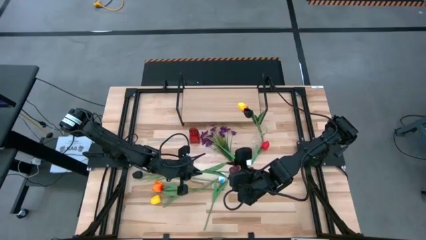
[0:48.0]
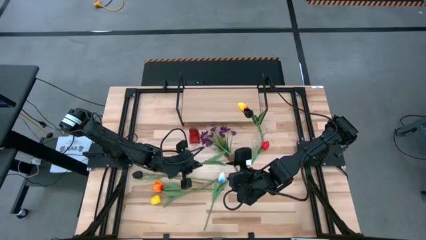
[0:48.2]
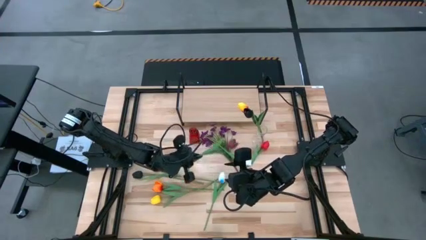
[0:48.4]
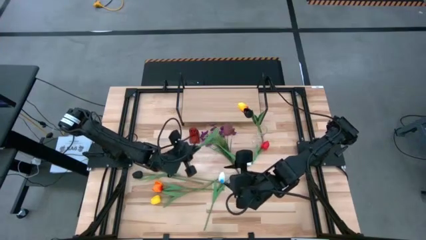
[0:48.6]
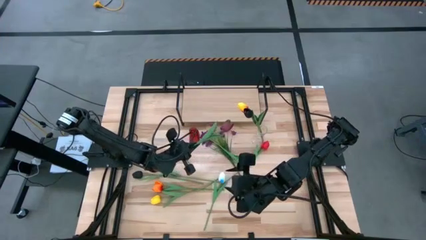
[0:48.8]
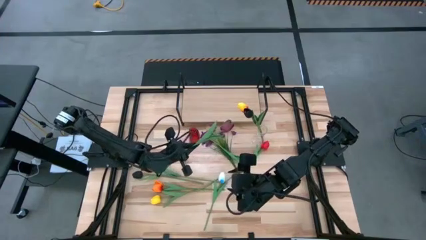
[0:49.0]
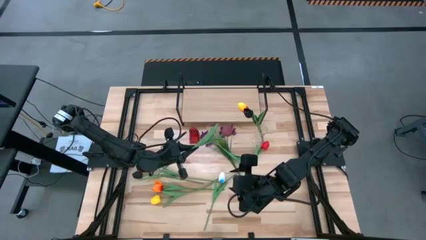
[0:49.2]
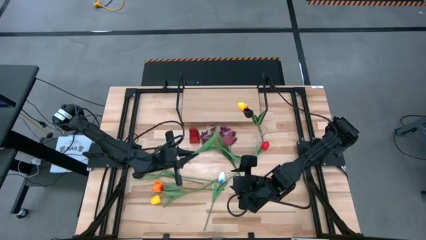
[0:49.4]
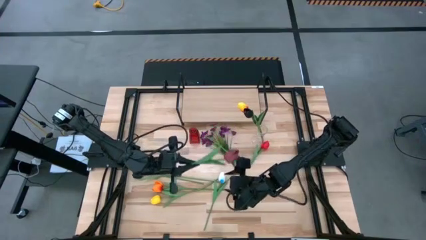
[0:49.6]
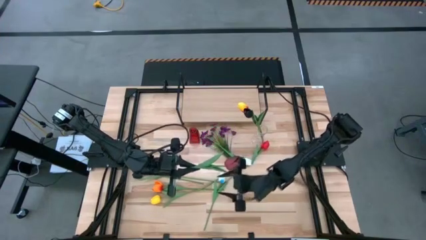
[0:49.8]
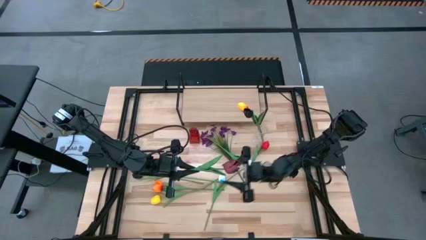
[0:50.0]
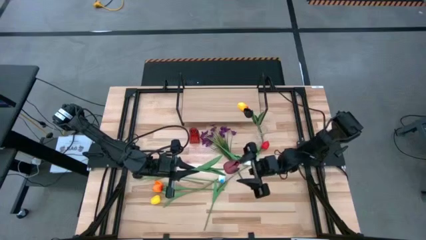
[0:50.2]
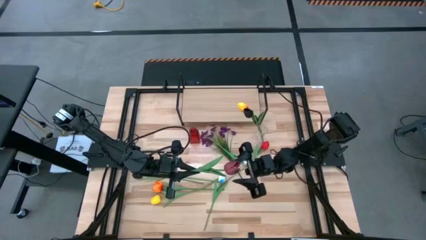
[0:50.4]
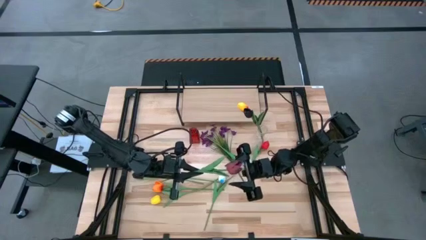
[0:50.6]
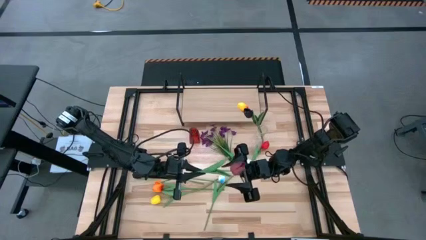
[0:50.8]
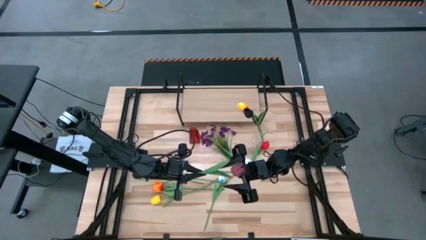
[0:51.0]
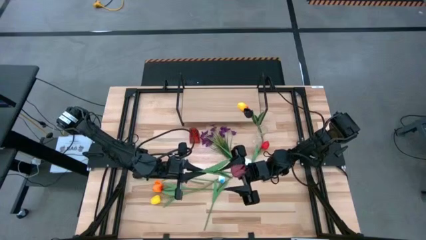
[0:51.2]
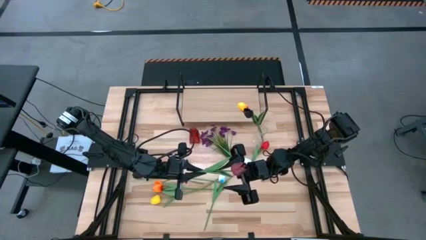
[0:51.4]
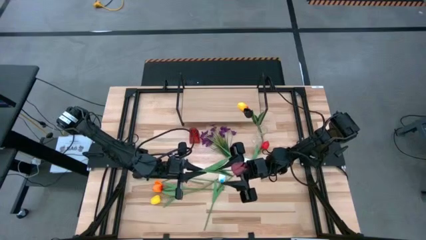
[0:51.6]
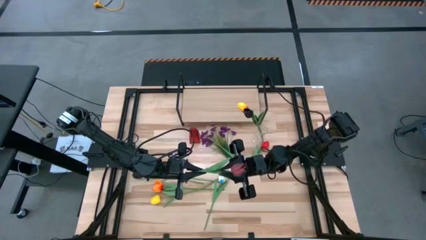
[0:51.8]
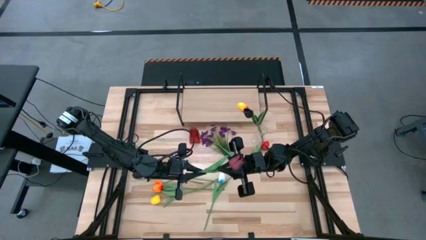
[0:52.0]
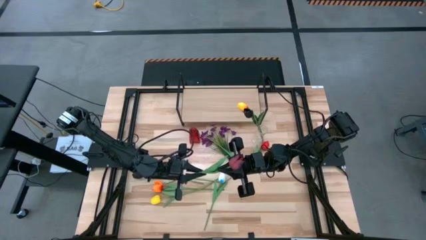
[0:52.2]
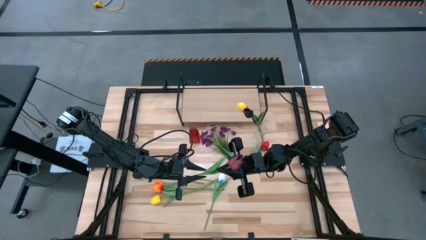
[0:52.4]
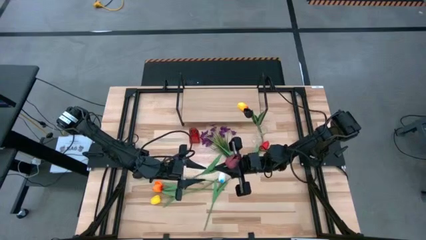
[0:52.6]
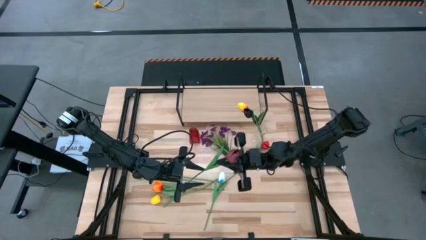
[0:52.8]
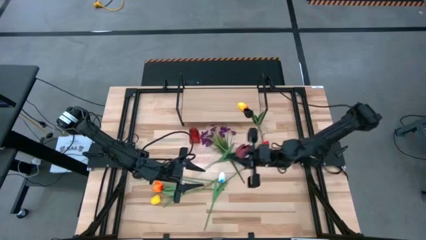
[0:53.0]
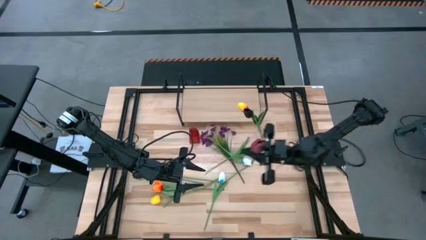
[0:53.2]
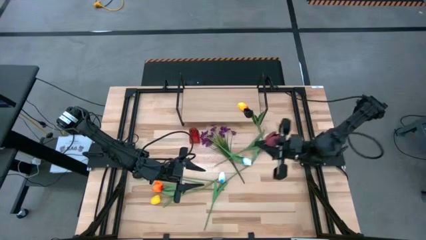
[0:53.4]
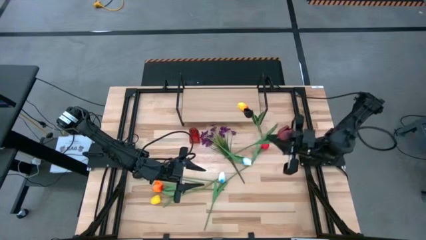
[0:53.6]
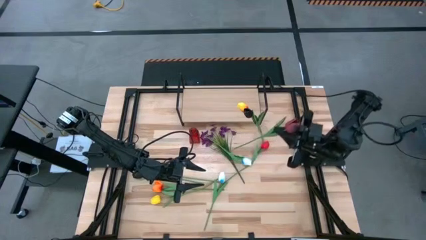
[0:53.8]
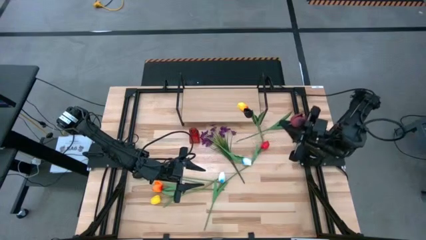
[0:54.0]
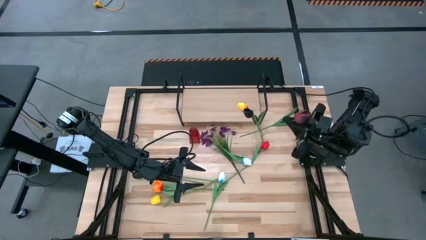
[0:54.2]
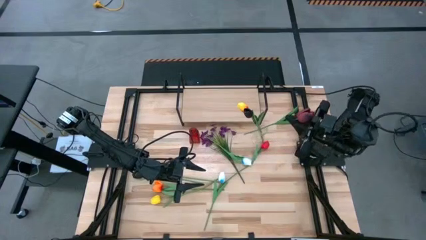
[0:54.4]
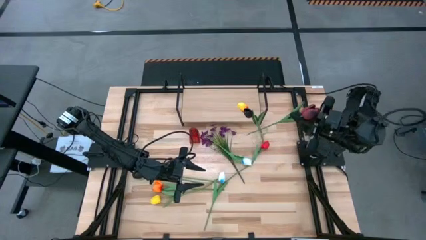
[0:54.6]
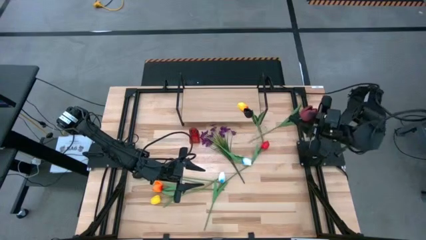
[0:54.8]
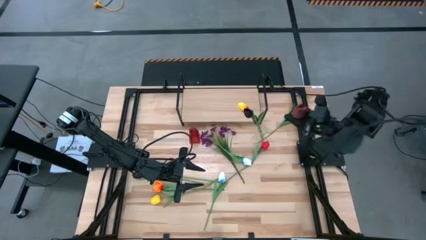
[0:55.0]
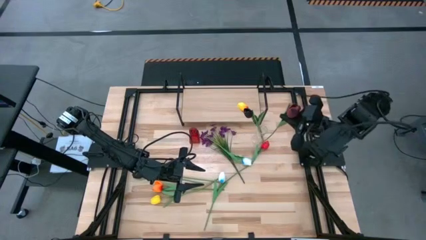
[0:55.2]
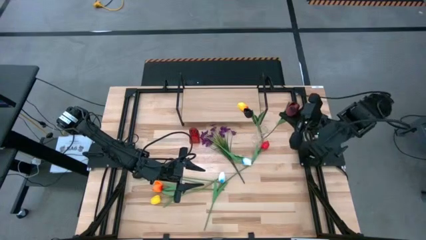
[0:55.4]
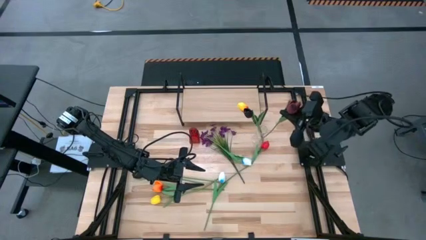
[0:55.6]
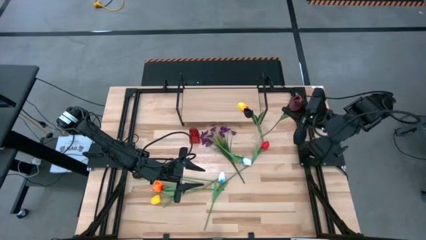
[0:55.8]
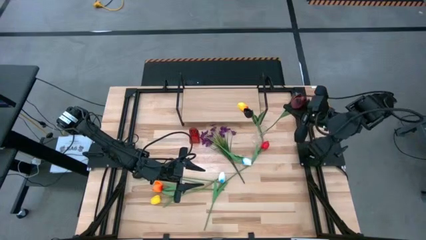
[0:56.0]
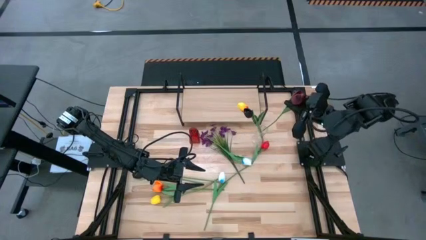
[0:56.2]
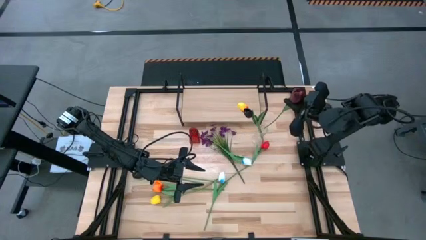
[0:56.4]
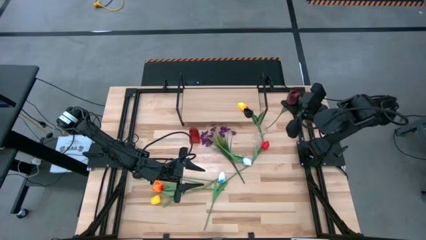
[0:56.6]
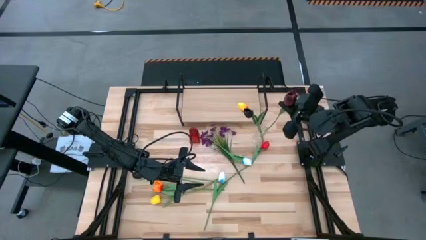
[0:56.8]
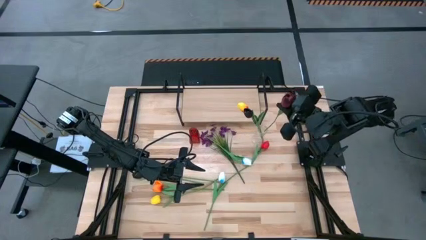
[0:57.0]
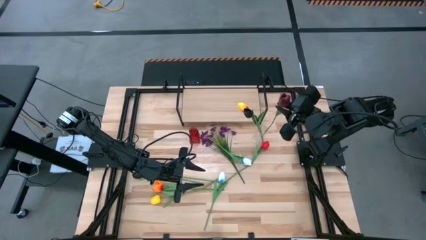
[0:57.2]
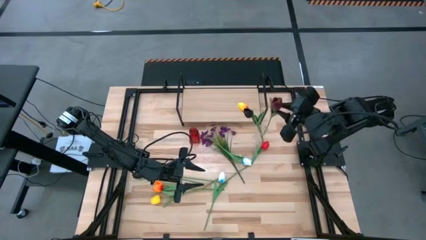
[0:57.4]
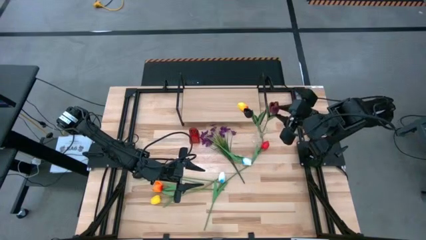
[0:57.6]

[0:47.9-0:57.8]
Task: Pick and place flowers into a vace then onto a shelf
Put the dark red flower into the transparent vase

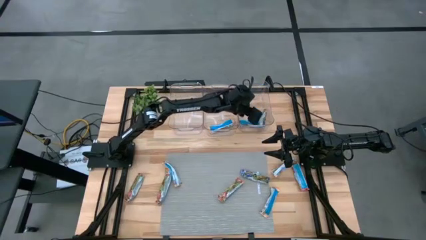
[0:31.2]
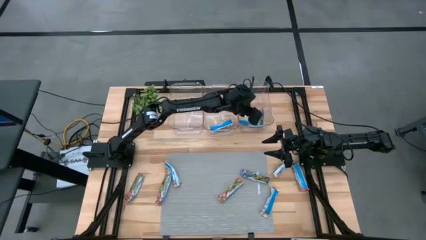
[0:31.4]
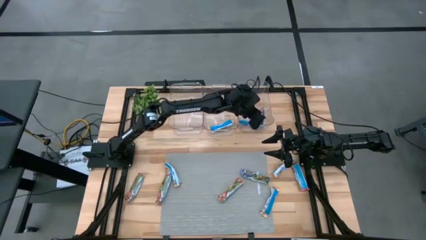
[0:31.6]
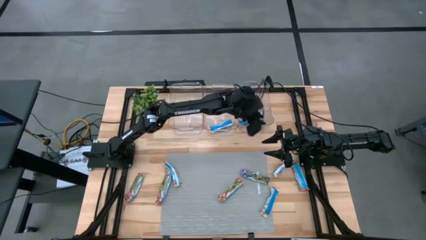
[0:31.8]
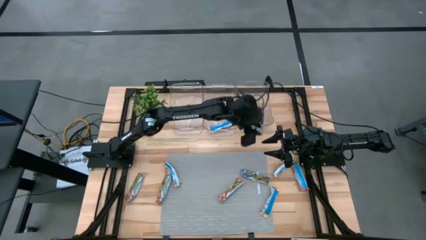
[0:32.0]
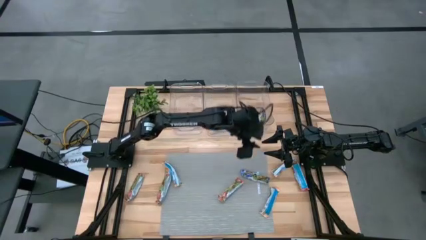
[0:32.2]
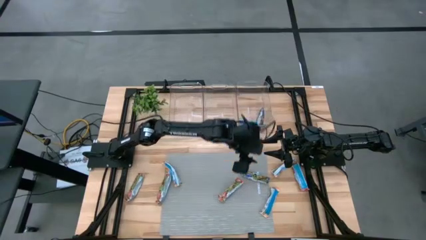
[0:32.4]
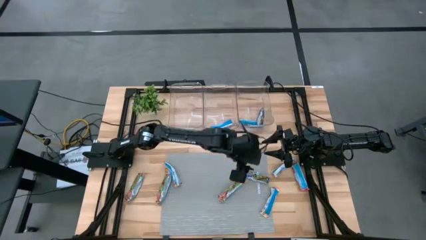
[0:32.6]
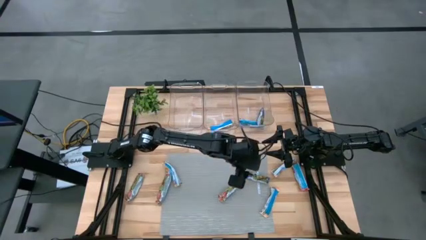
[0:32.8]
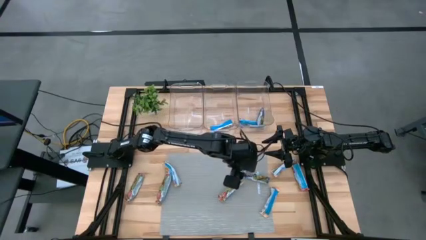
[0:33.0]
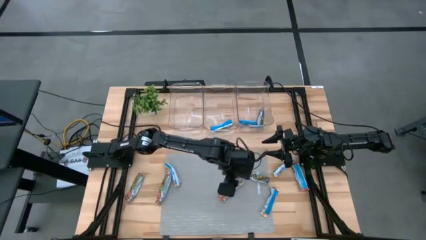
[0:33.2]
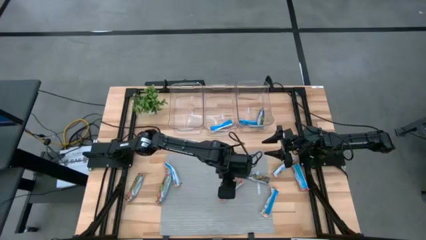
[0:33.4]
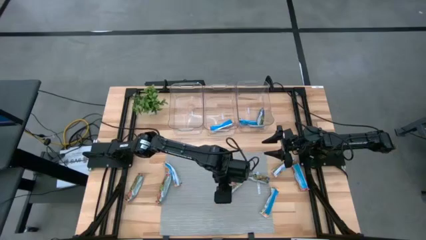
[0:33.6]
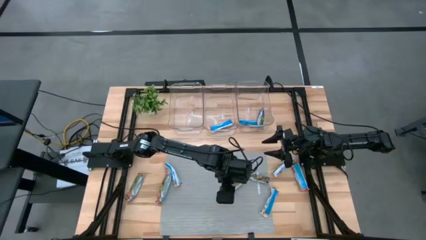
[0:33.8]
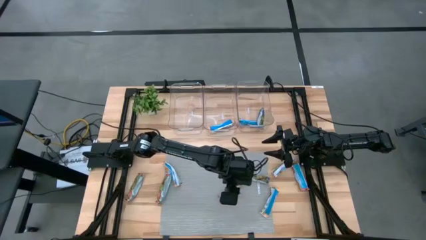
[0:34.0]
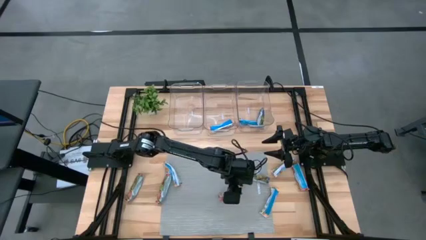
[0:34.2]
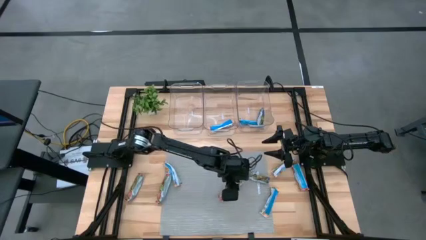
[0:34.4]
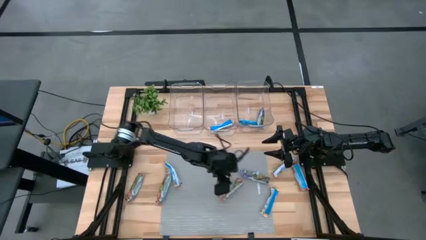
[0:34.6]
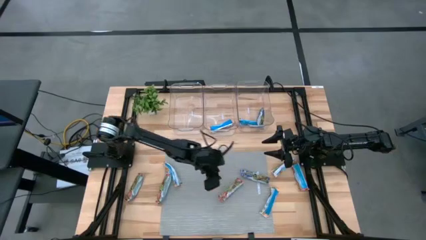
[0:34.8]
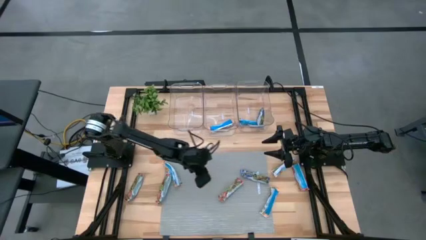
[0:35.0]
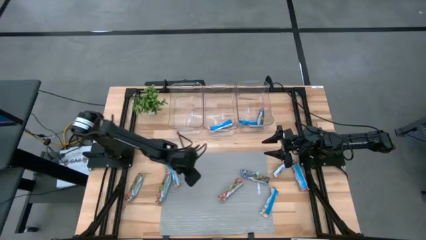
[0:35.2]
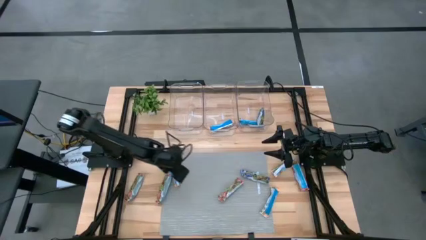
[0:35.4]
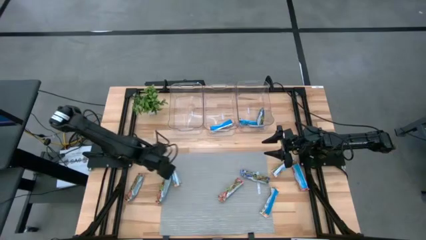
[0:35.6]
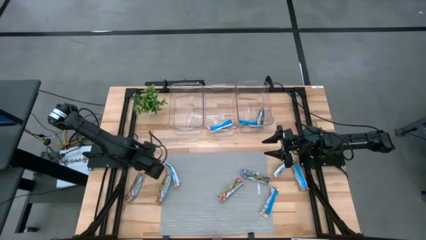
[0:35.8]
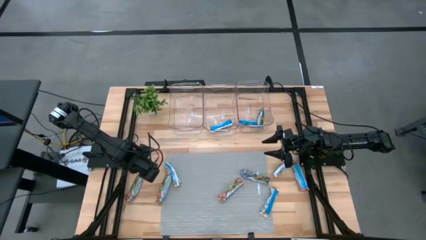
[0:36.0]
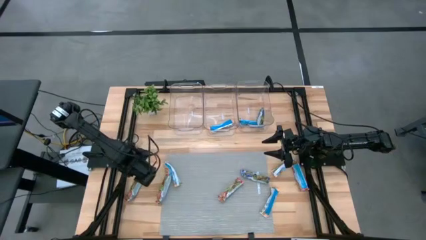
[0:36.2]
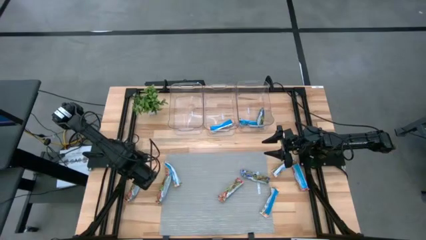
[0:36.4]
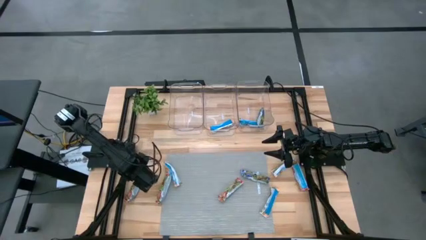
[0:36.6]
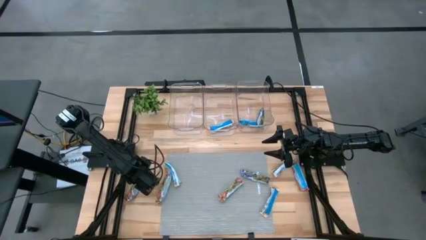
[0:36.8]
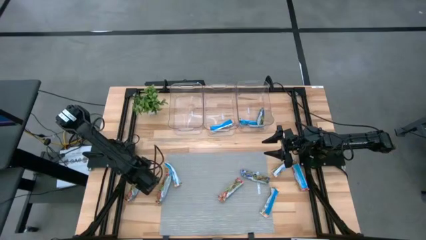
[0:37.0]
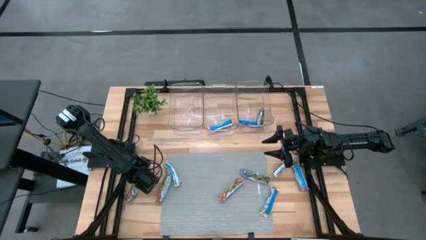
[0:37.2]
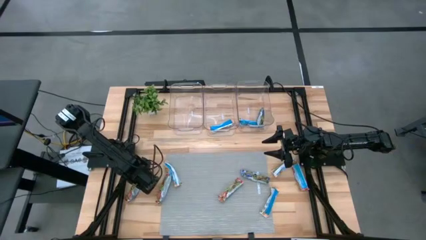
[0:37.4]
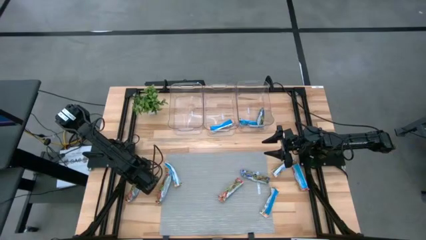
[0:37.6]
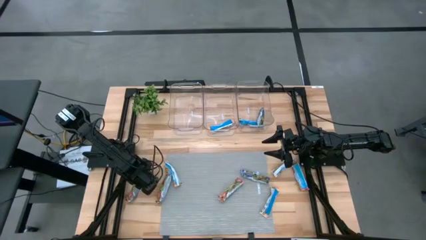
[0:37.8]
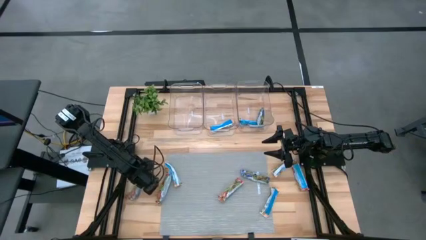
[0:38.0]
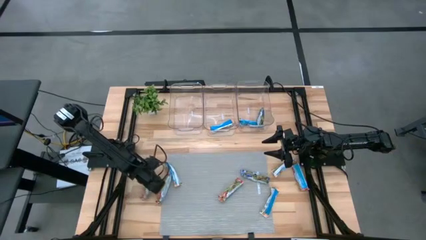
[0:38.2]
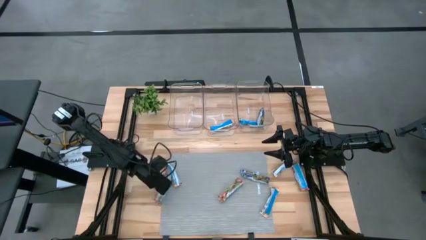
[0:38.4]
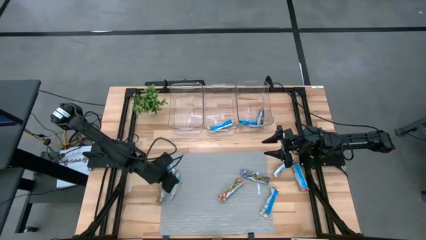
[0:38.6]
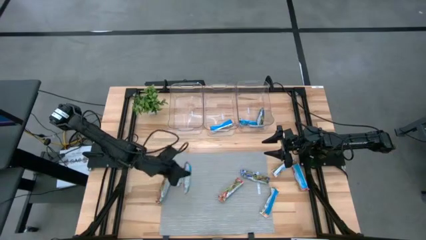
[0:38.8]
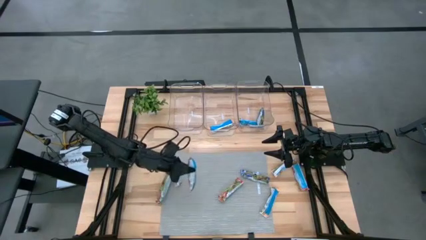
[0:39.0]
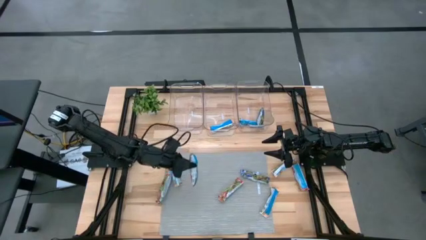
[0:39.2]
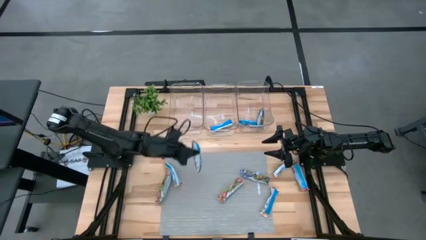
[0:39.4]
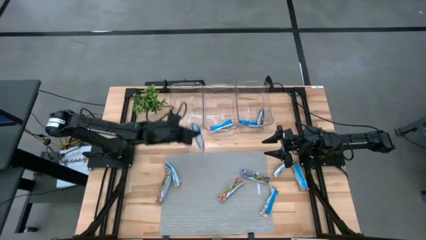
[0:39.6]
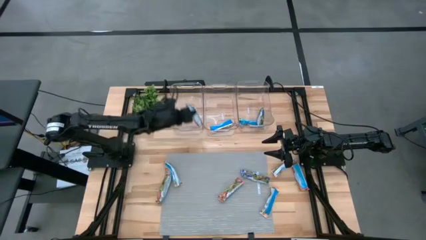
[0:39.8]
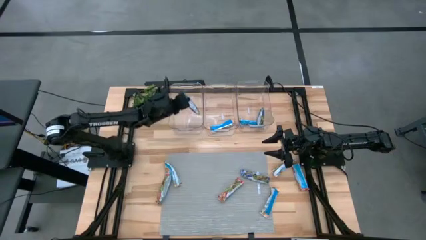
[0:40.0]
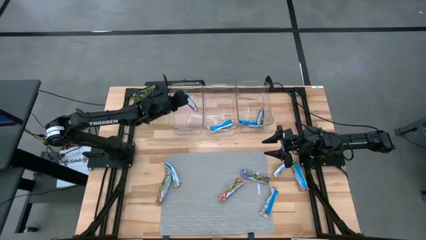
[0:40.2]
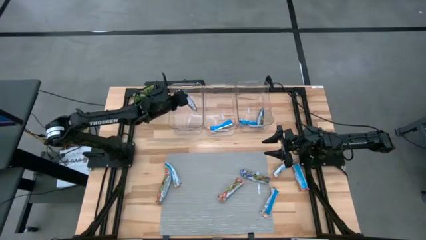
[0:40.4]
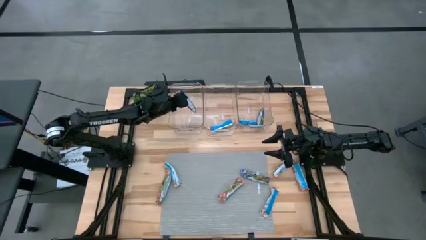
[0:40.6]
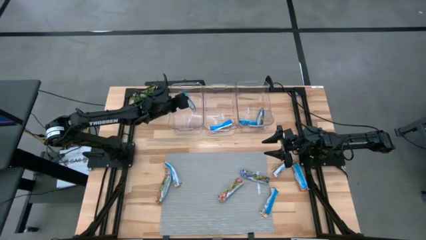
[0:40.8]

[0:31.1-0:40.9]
Task: Pick and place Granola Bars by type
Put the red granola bar into the left transparent bin
